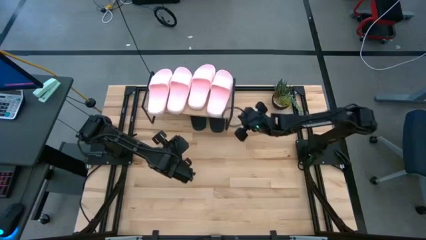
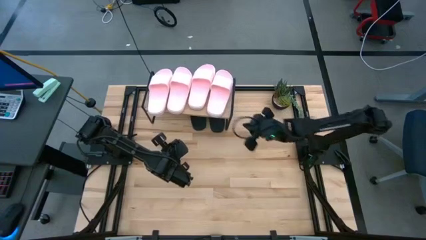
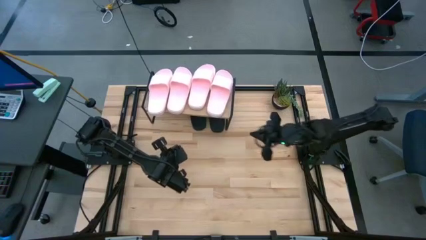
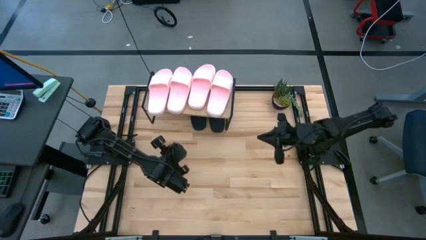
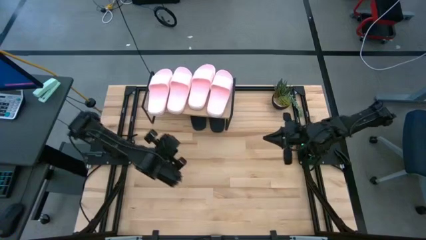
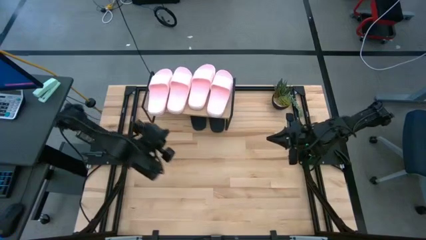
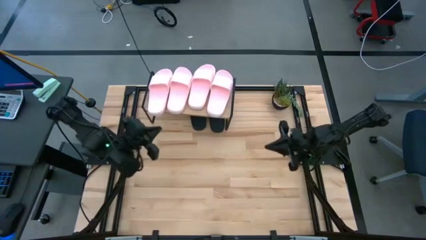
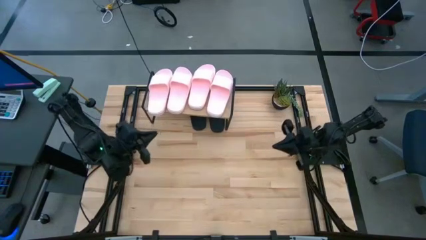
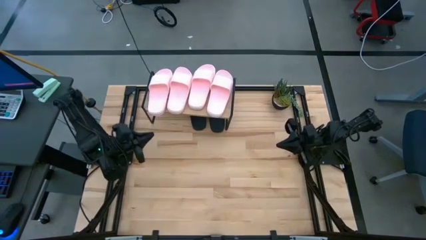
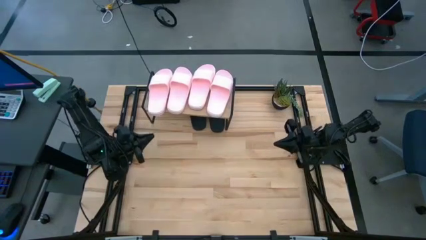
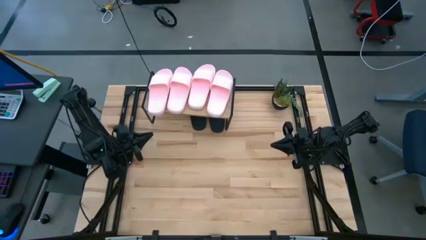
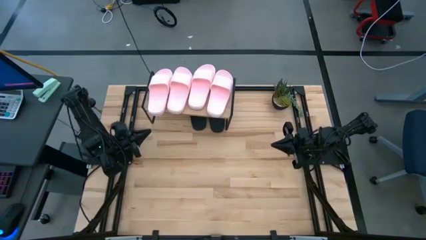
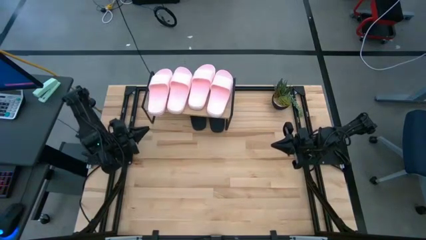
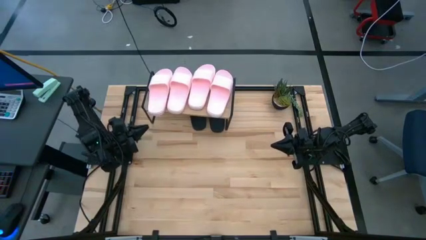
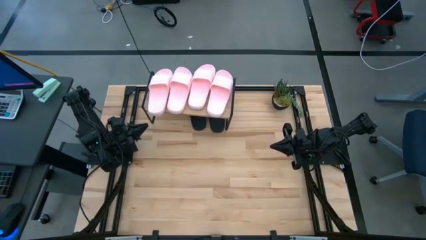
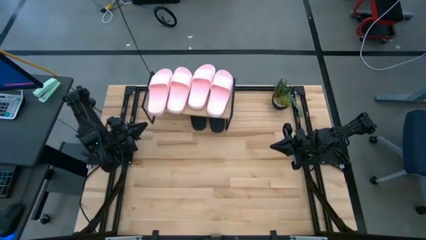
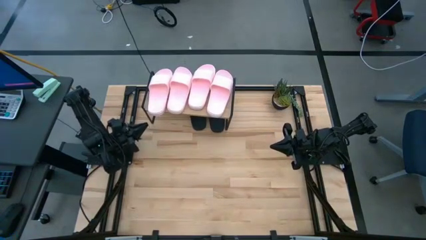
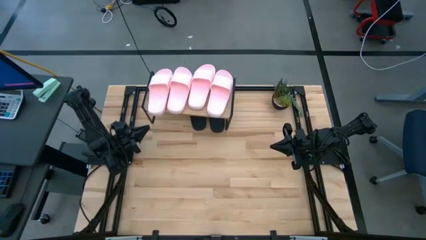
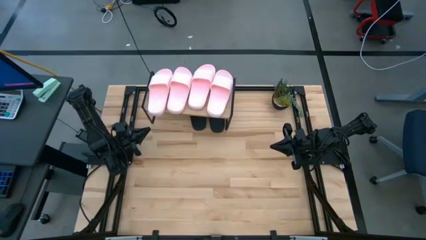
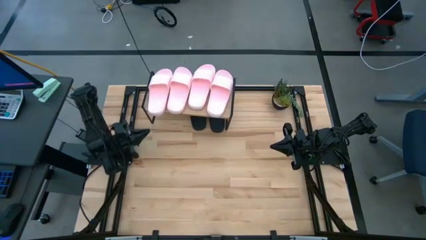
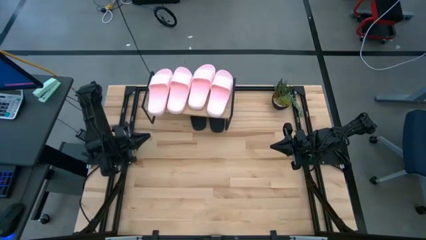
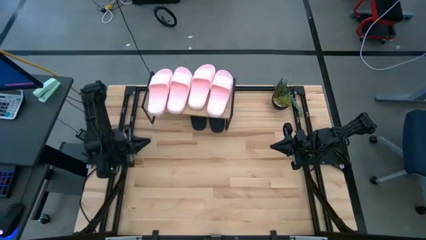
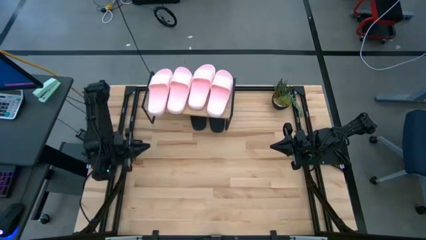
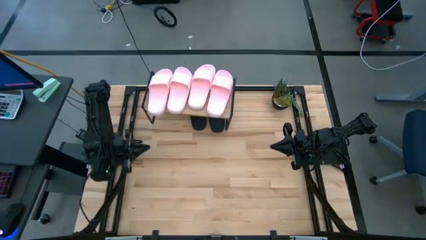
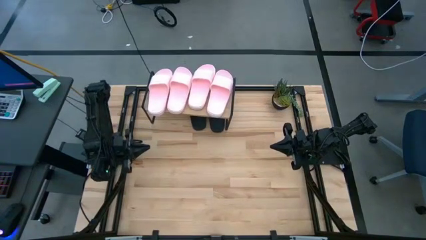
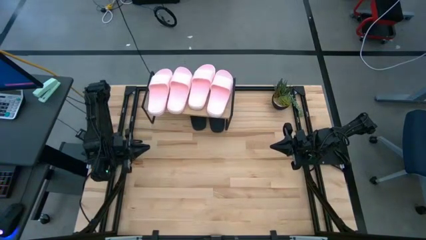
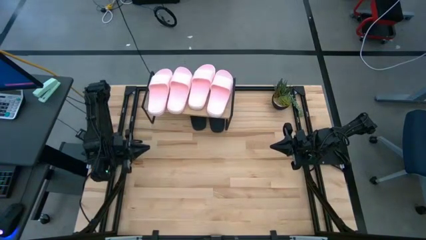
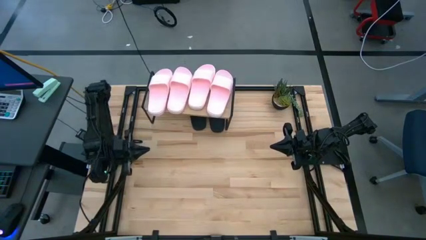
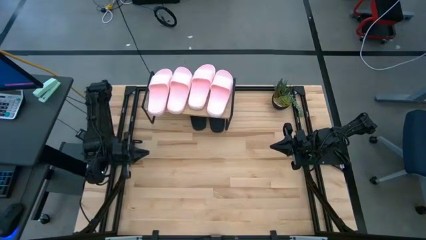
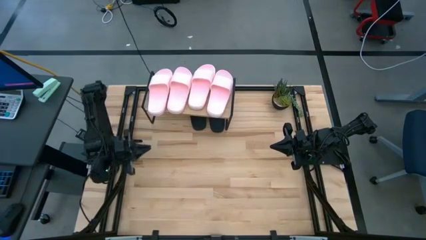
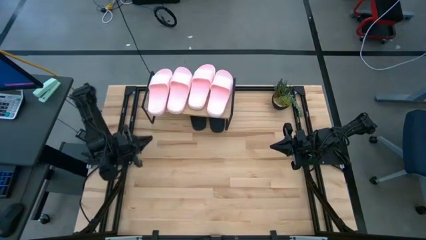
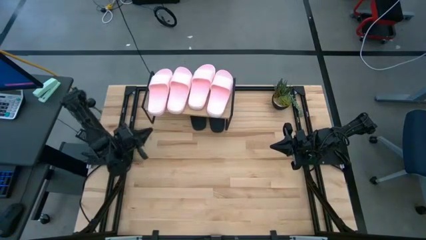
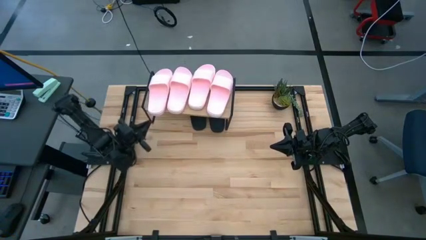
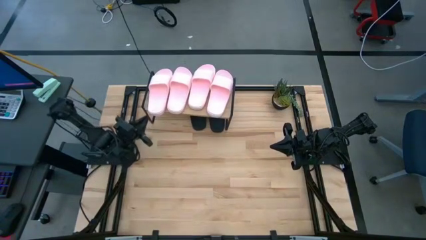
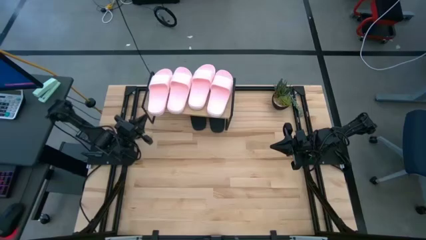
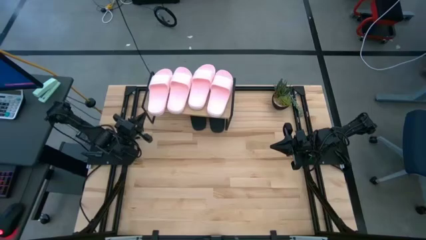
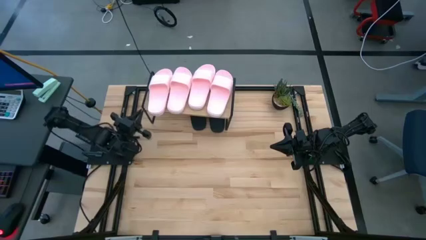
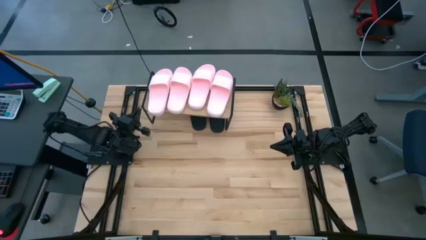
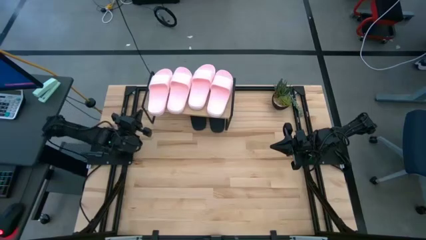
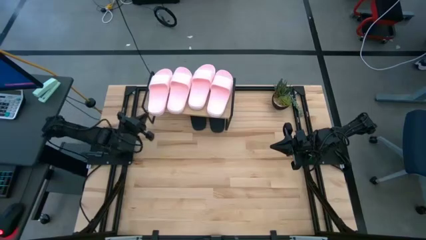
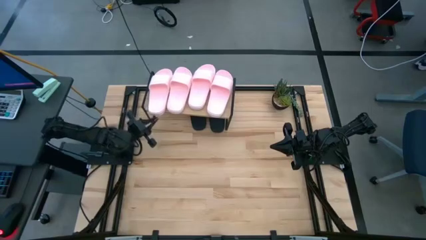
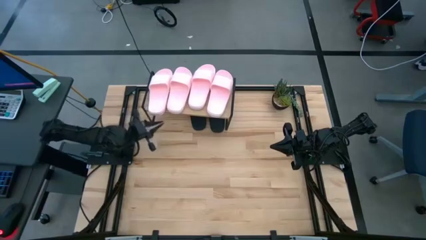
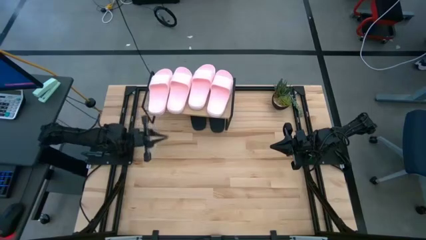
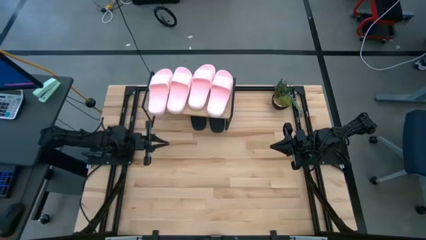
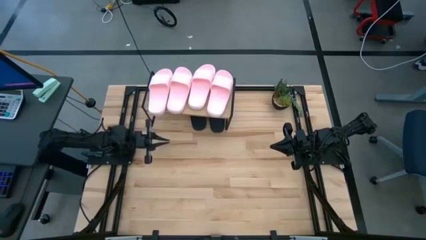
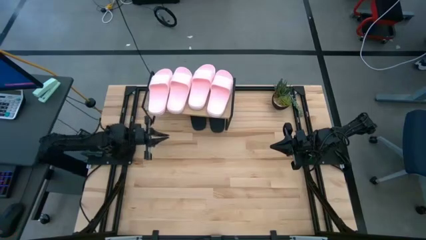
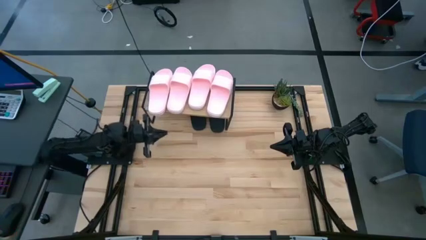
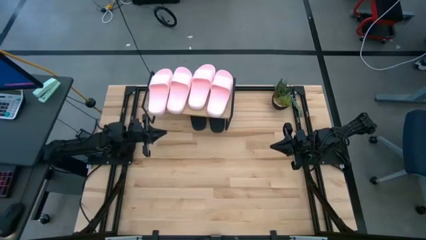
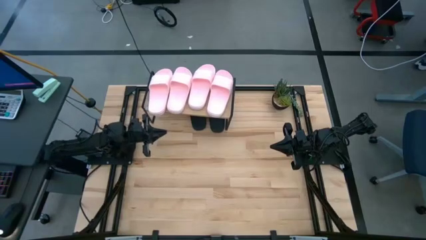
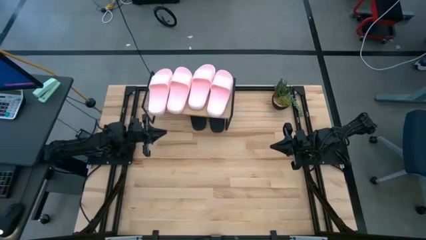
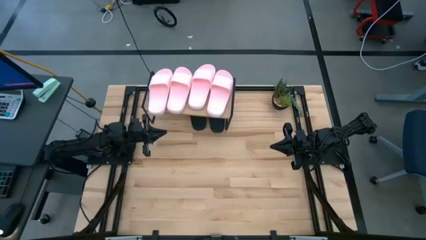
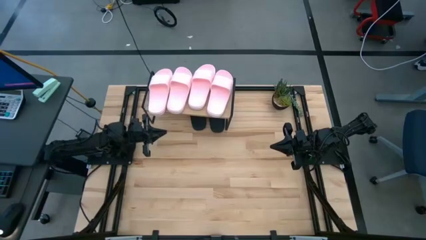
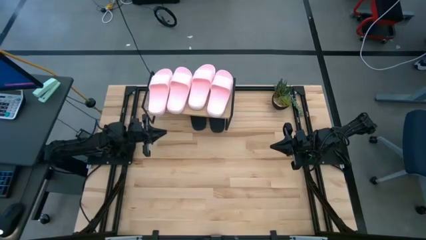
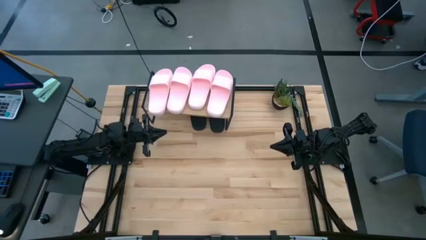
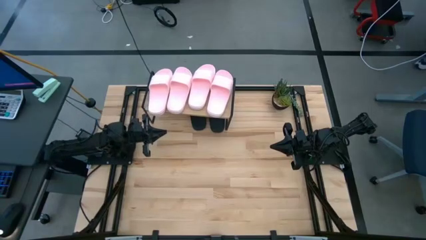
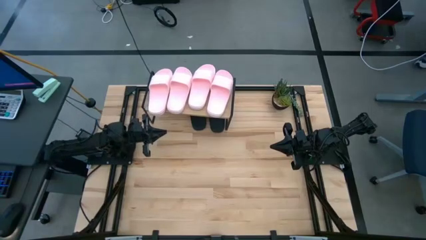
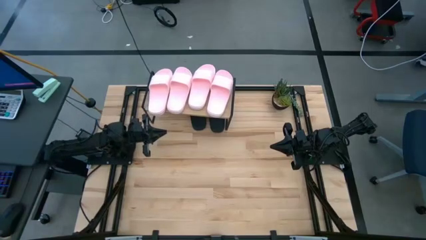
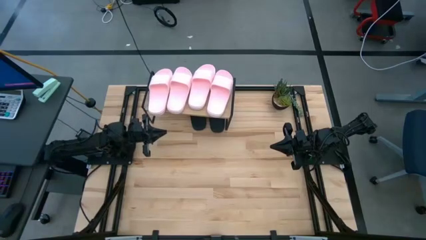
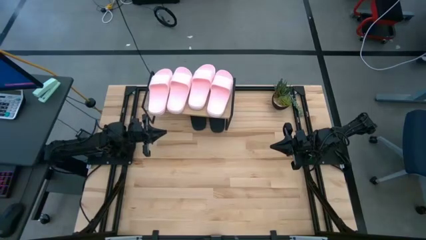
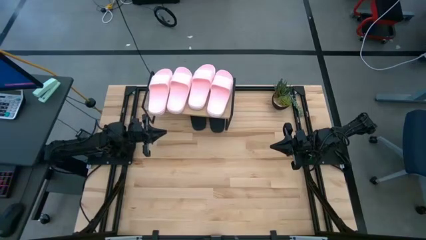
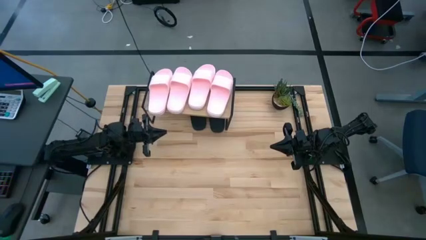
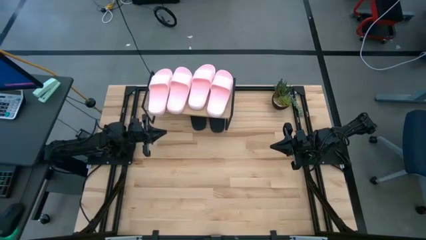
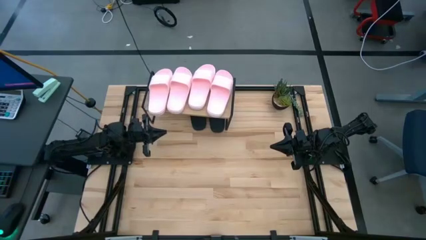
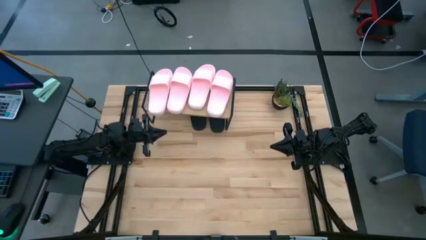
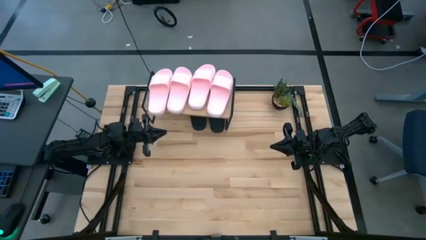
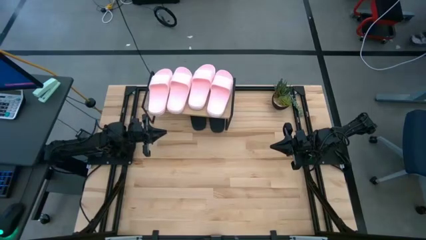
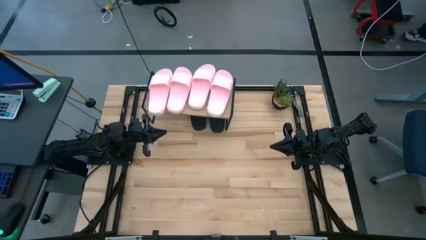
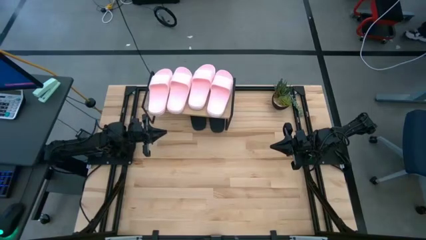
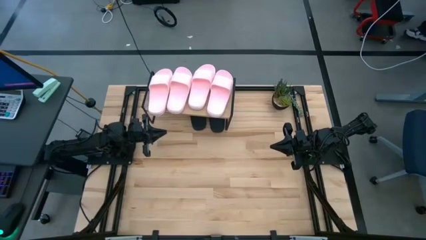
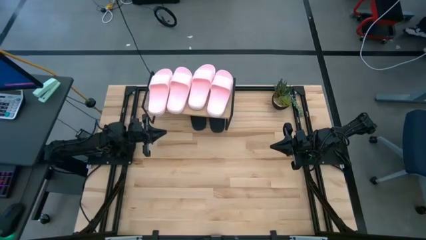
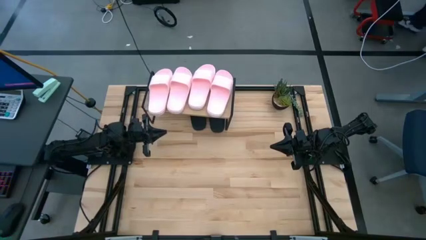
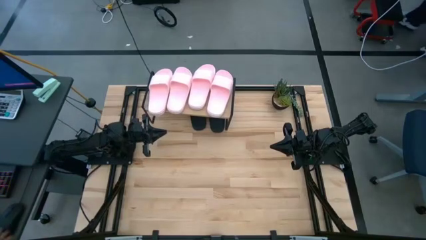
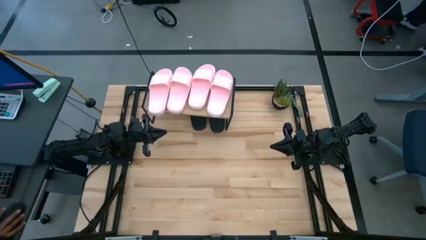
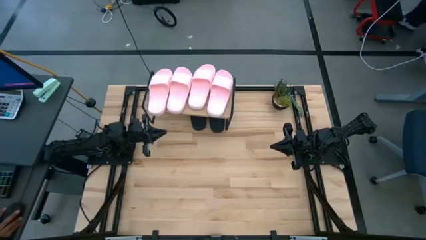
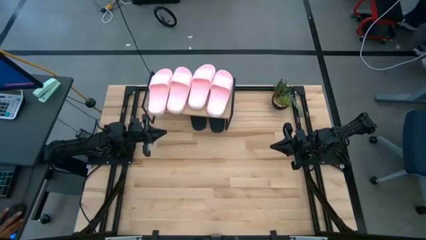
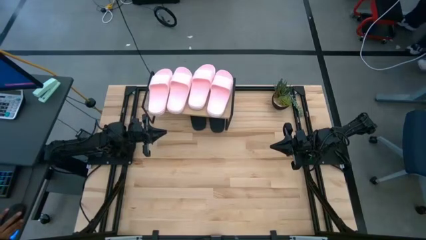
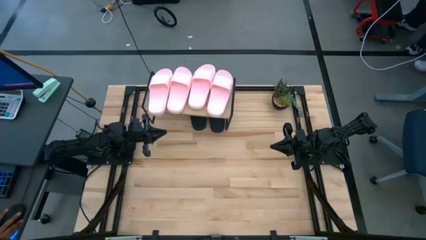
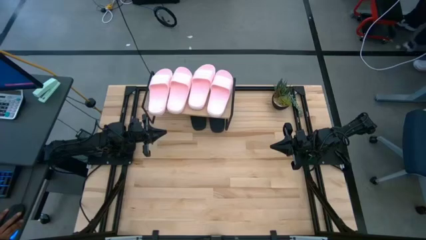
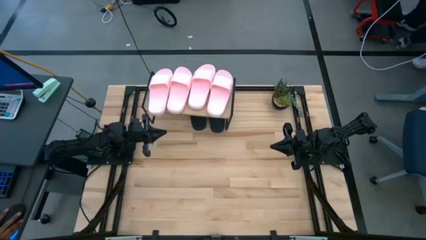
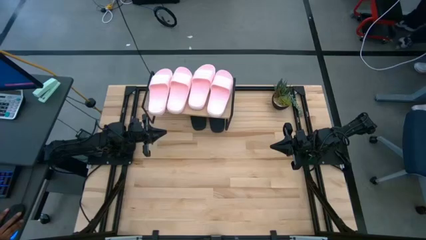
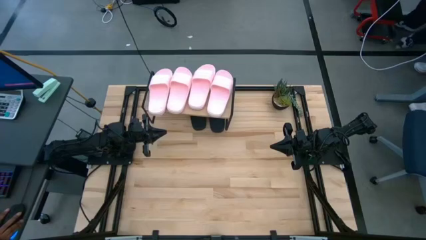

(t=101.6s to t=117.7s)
Task: Pick and place slides into the shelf
Return to Home Position
